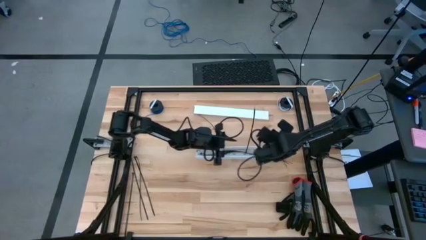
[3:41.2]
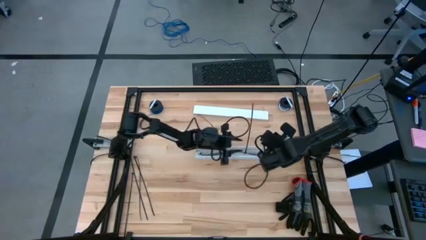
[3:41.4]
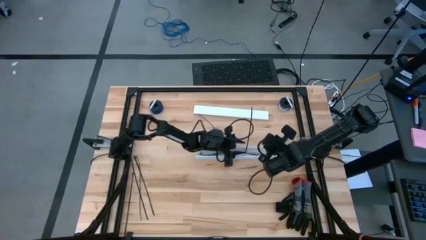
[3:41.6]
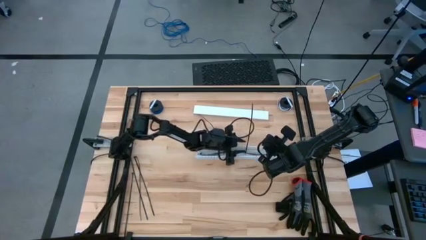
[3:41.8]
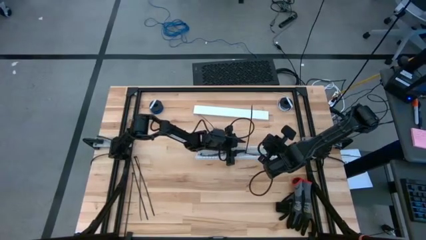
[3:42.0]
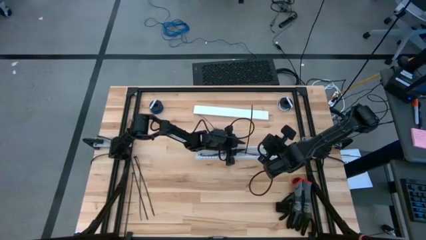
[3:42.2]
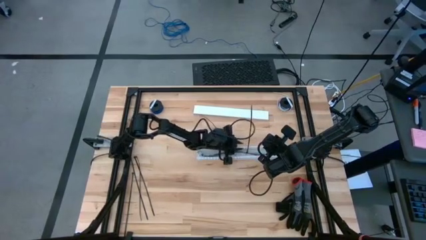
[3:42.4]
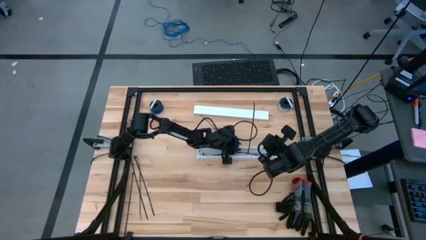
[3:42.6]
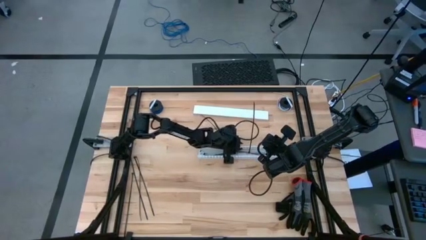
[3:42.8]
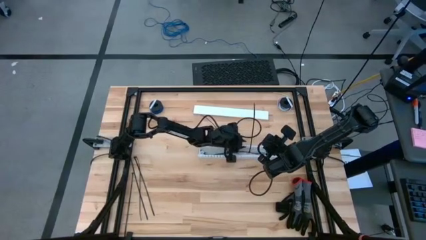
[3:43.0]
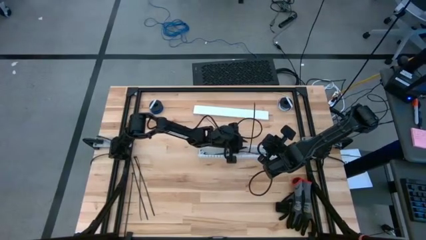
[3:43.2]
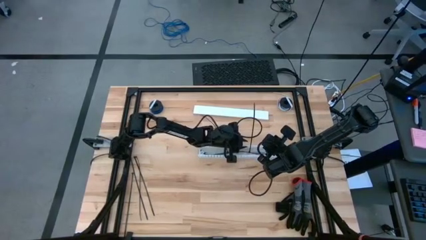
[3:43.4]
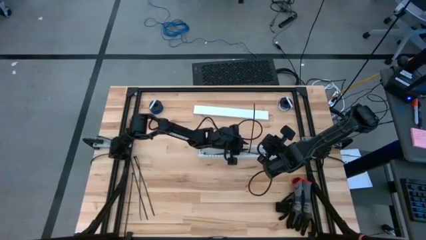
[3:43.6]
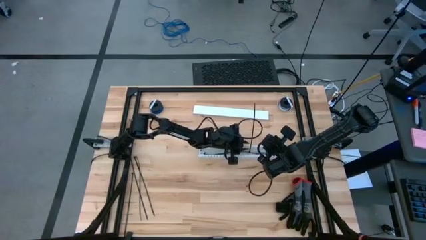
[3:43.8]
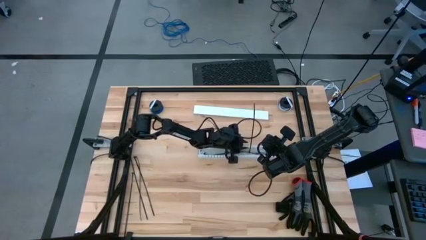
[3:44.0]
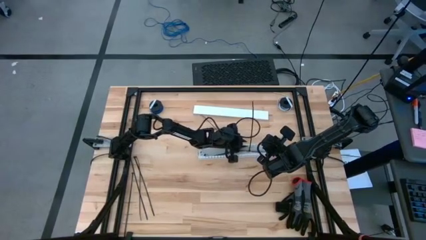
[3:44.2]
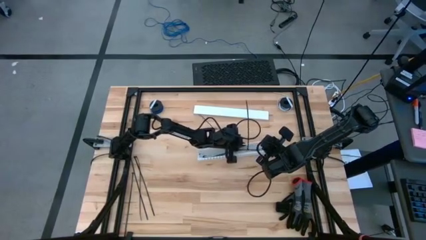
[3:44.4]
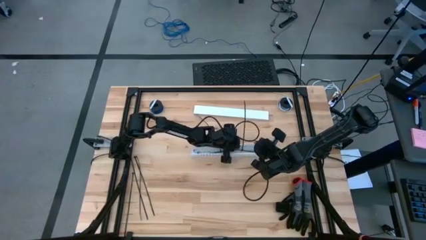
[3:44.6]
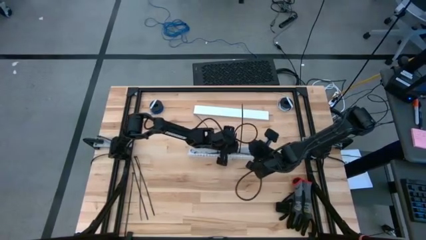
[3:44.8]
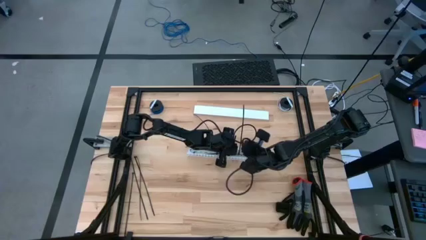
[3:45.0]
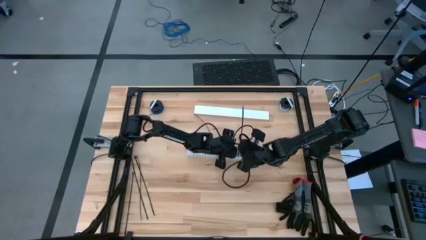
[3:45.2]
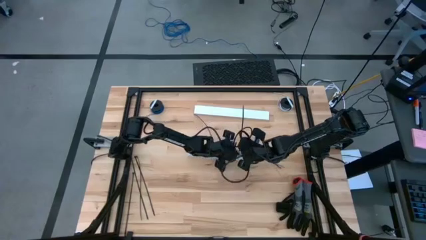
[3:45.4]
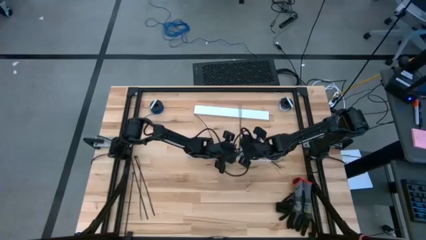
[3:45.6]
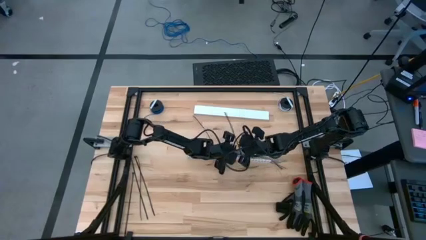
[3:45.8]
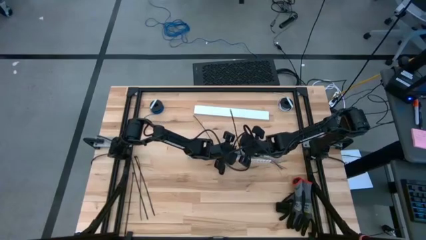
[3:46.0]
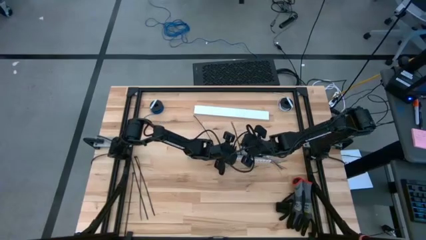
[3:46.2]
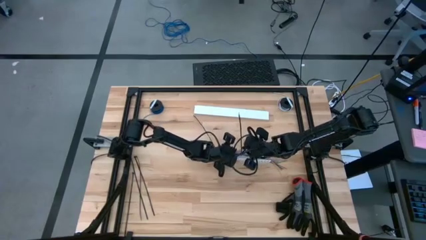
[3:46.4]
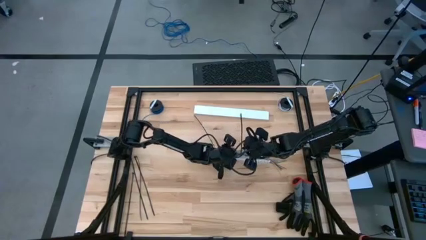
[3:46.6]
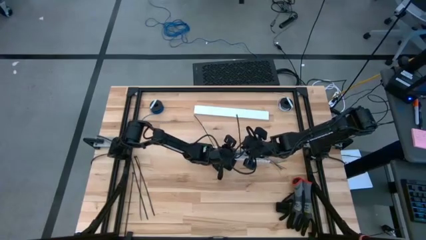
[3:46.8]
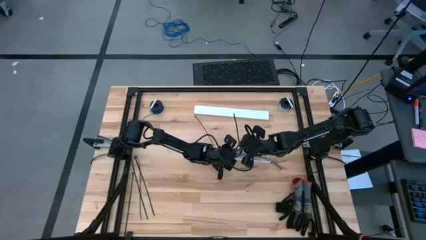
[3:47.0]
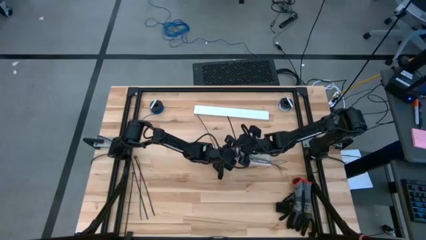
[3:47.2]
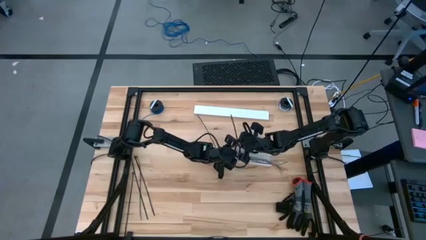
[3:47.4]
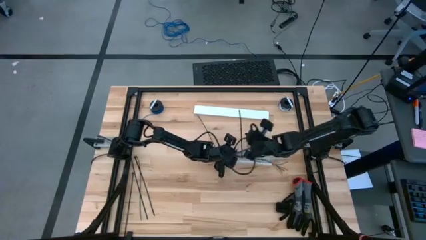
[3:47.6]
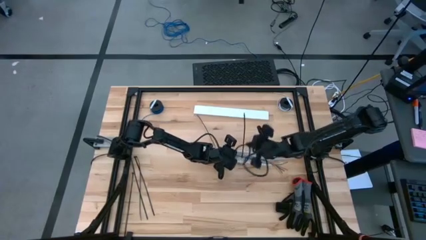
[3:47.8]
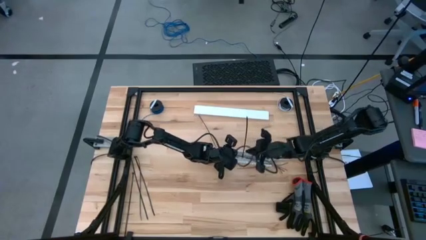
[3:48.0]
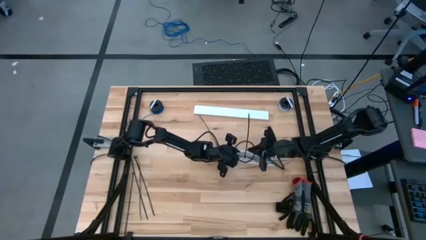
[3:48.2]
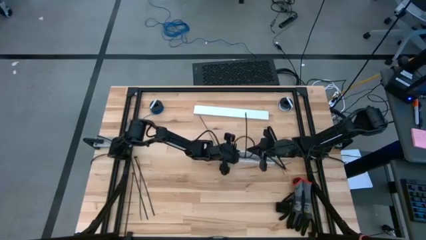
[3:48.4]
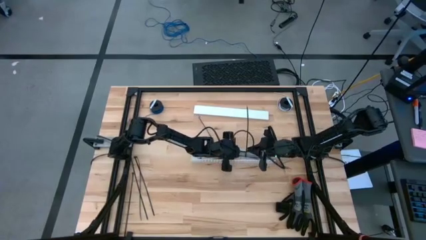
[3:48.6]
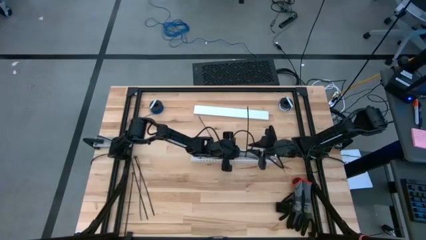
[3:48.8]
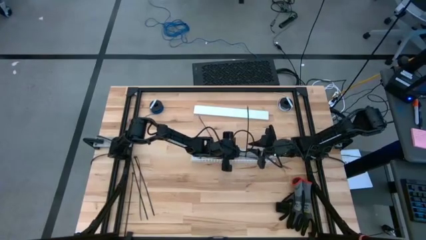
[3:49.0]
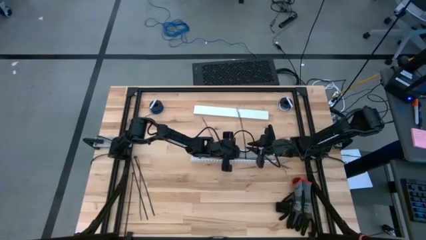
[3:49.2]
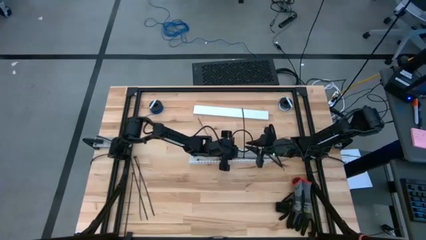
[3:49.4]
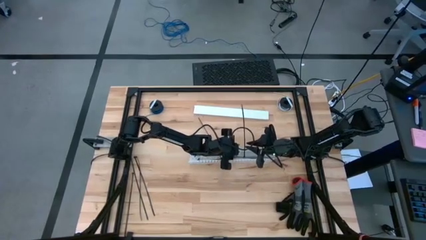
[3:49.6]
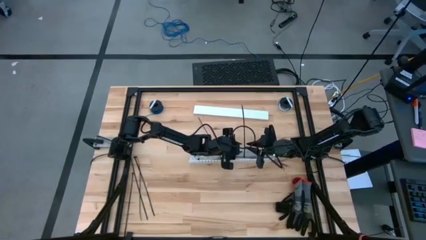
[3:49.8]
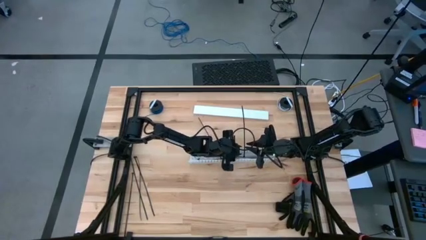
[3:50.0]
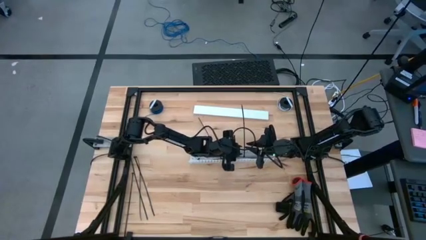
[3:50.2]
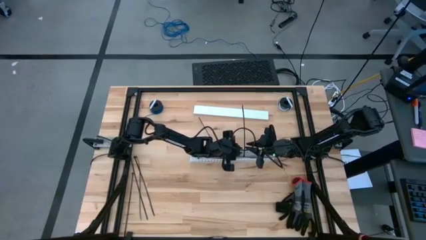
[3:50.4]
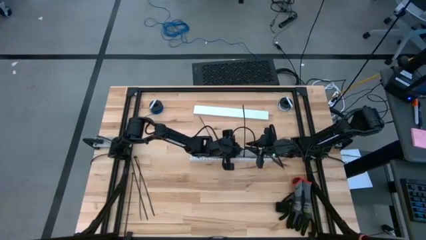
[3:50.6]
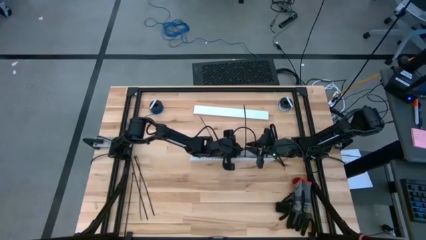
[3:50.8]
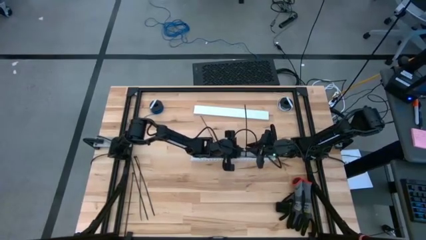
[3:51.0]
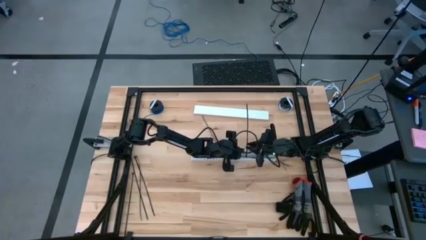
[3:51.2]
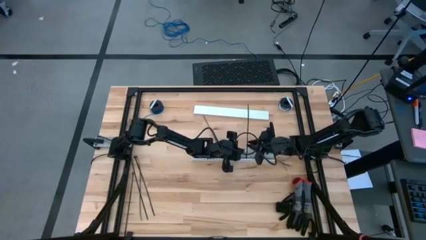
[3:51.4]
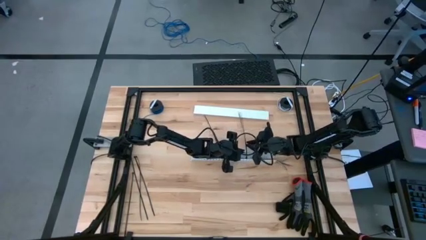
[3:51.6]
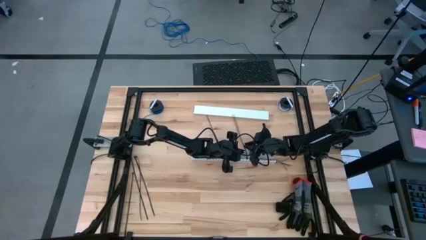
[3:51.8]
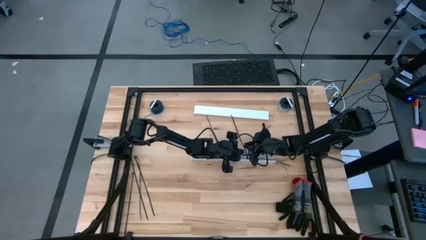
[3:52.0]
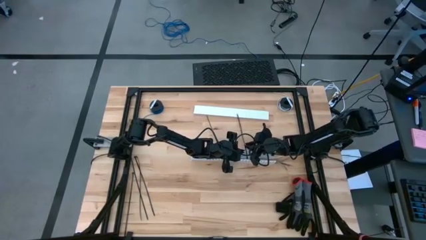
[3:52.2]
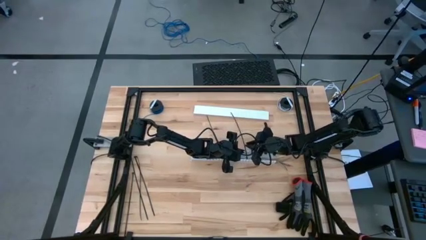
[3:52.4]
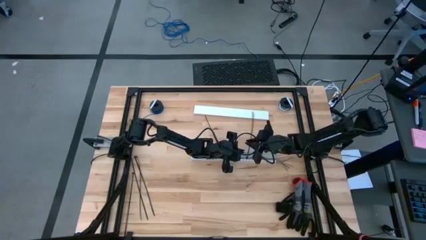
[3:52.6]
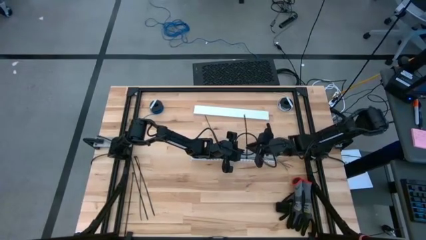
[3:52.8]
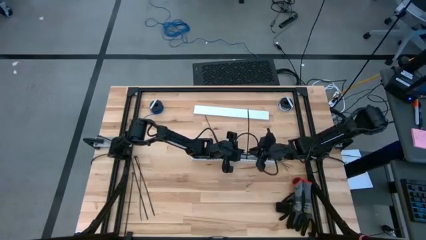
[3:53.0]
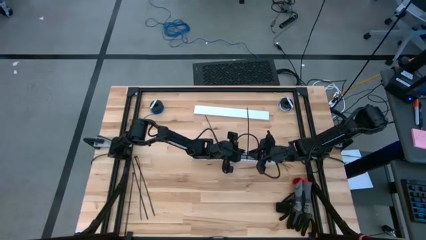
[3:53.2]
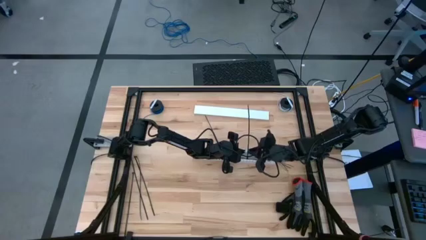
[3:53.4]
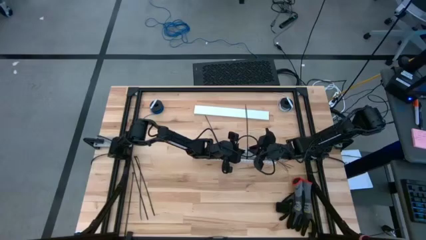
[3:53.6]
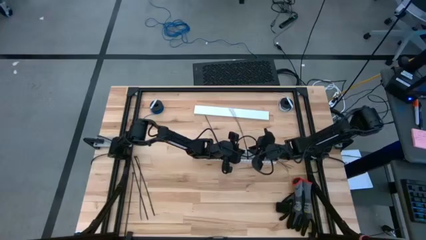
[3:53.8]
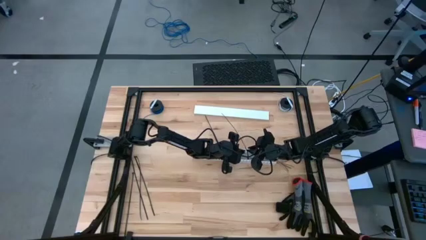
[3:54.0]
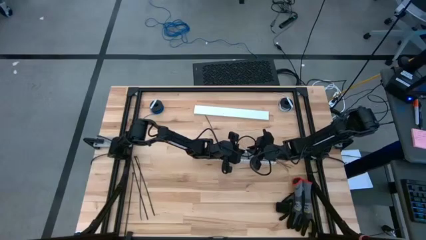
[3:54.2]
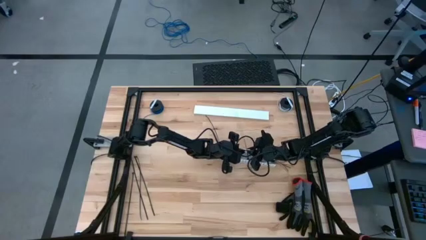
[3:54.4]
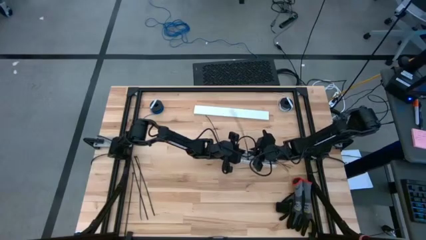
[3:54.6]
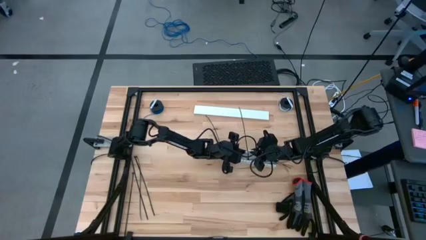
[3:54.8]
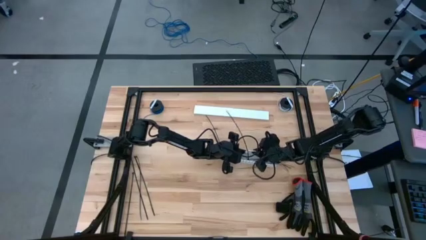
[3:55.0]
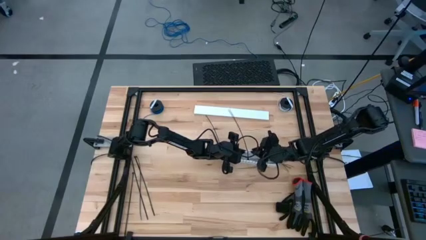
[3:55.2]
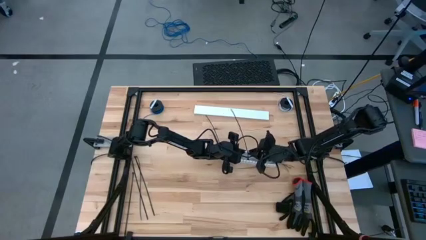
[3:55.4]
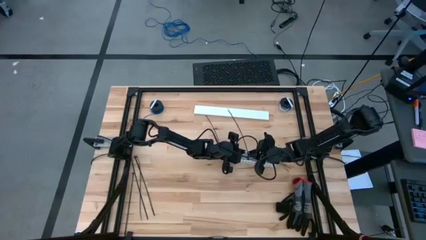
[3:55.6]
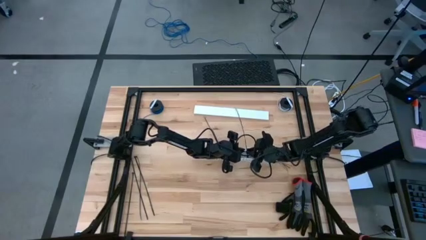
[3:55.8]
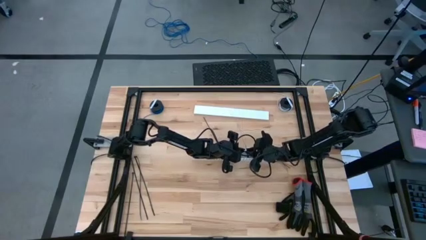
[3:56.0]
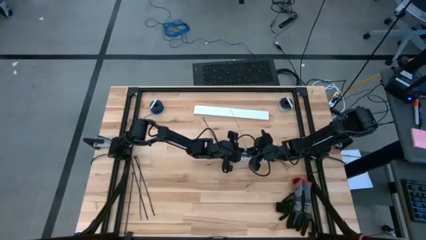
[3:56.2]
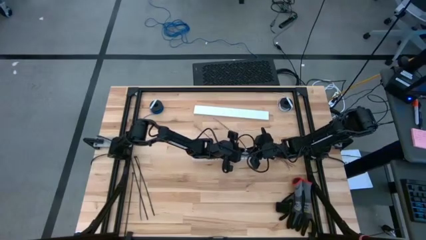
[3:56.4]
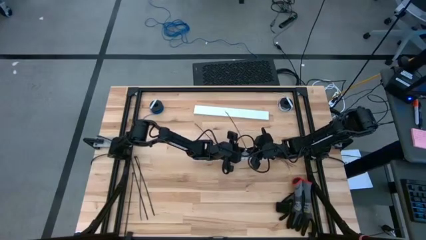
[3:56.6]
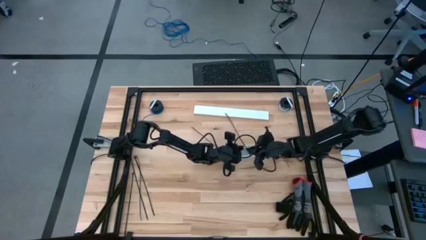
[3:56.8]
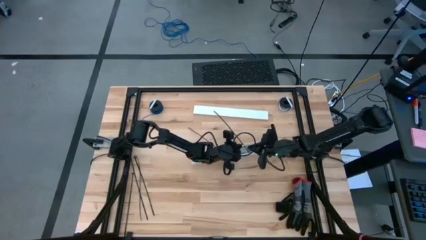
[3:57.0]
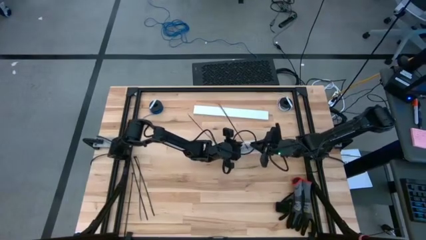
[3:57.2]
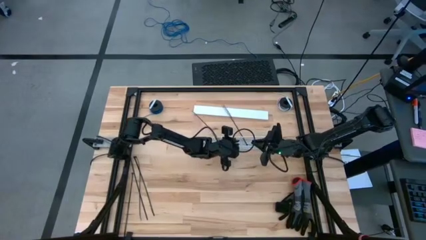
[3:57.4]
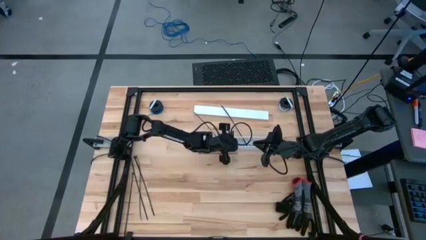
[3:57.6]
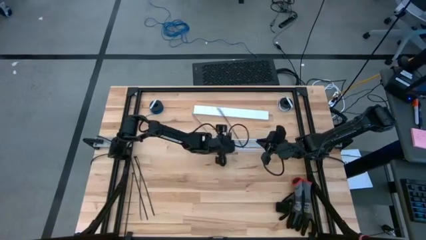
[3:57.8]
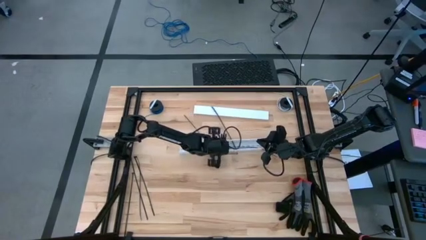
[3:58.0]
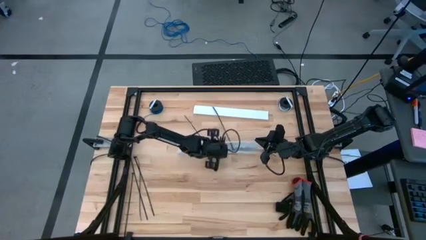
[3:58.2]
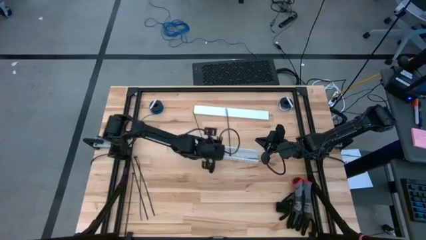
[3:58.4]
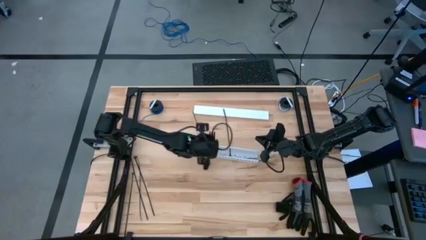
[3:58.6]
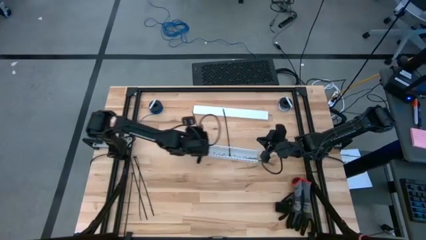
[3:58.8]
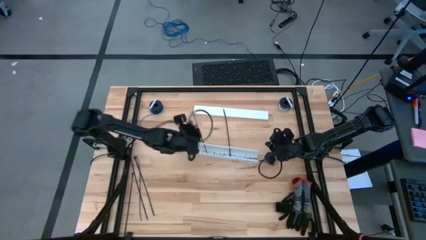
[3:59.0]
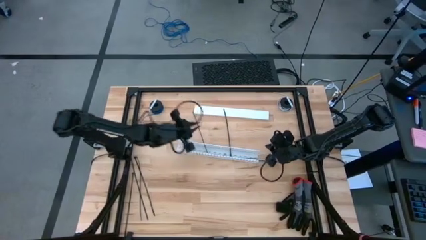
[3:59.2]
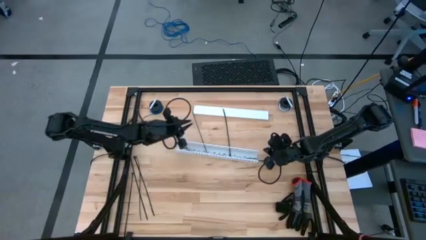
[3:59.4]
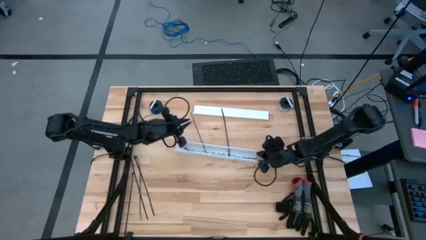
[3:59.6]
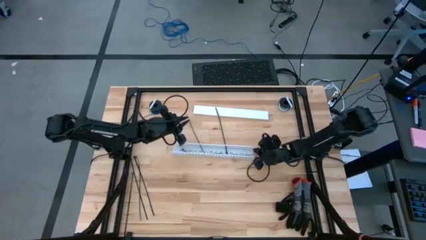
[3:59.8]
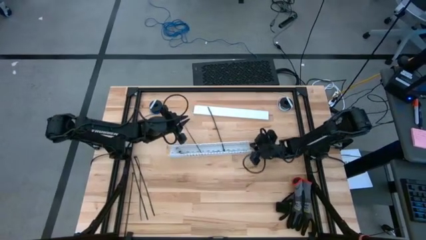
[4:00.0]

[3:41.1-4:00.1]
Task: Ziptie cables
Put the colored ziptied cables into the white cable duct
